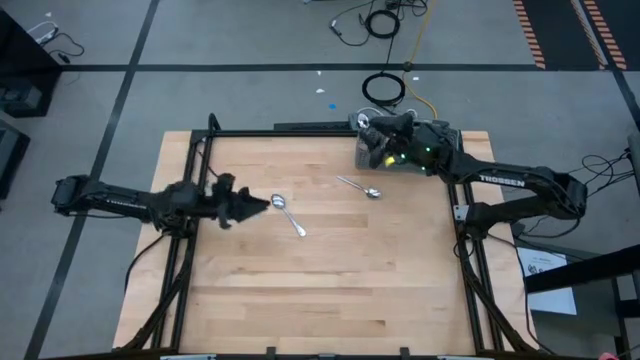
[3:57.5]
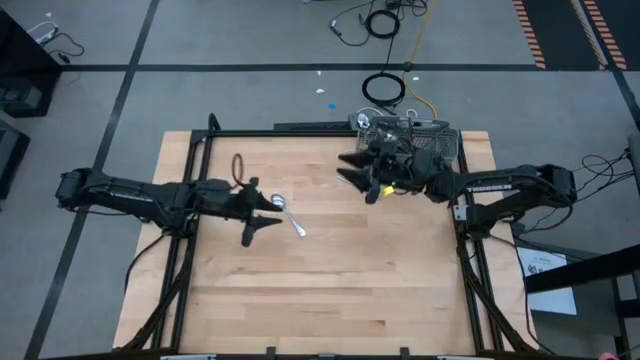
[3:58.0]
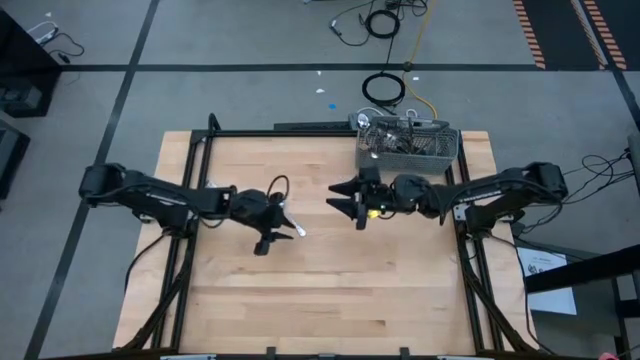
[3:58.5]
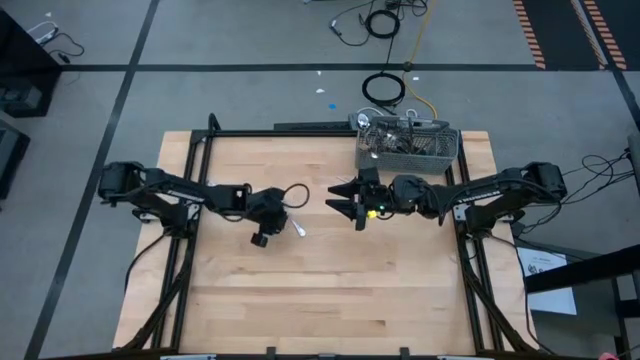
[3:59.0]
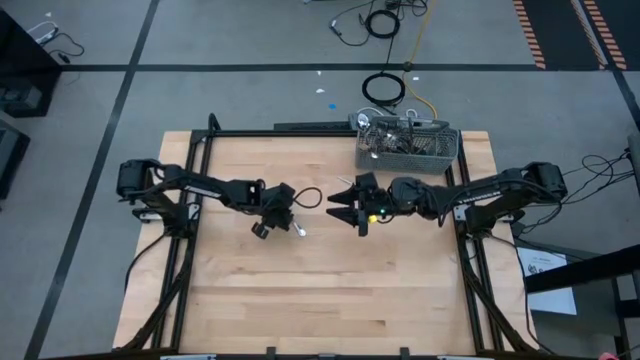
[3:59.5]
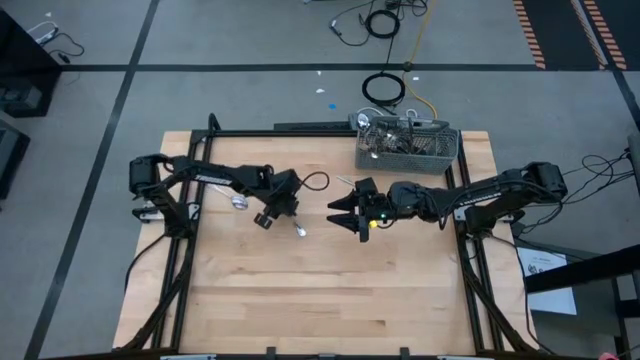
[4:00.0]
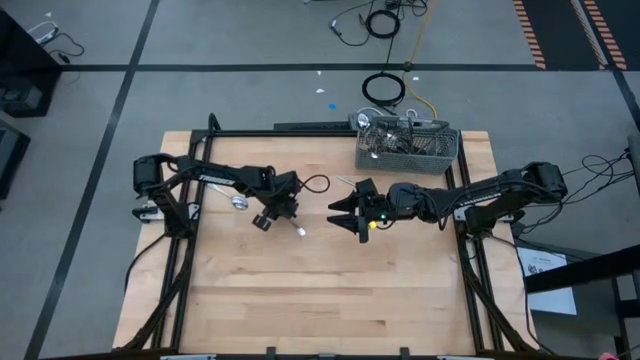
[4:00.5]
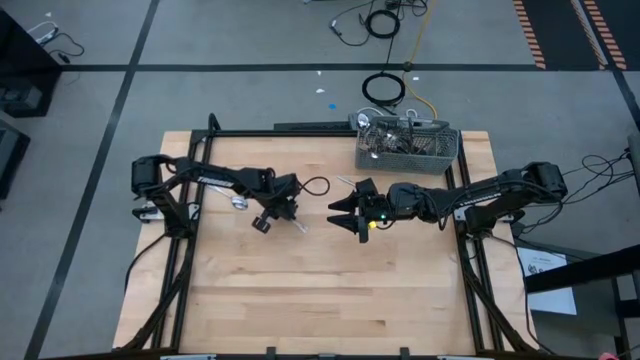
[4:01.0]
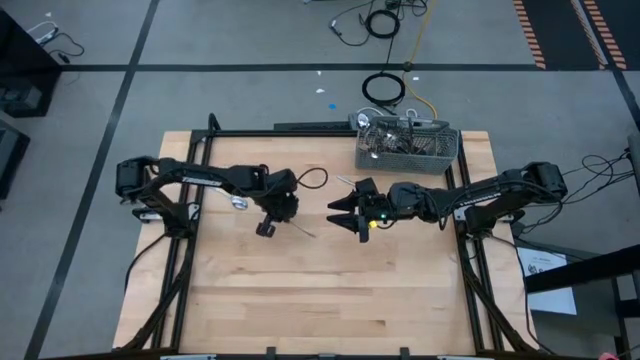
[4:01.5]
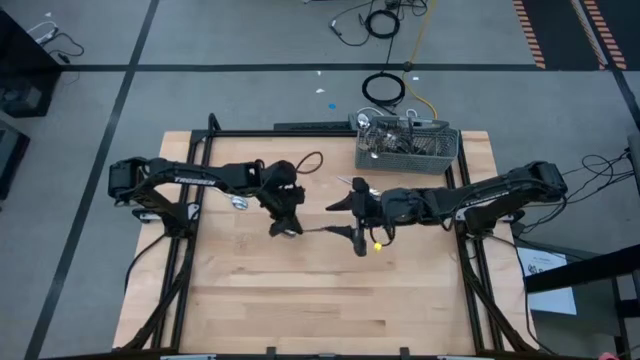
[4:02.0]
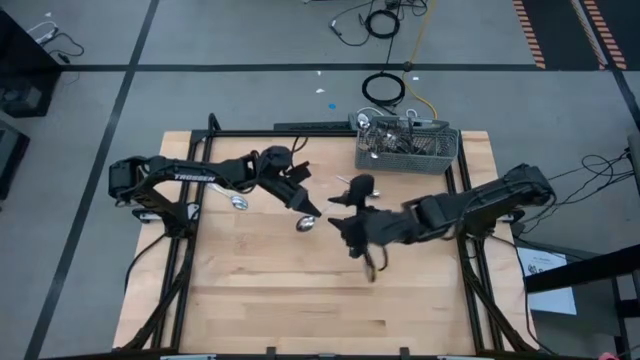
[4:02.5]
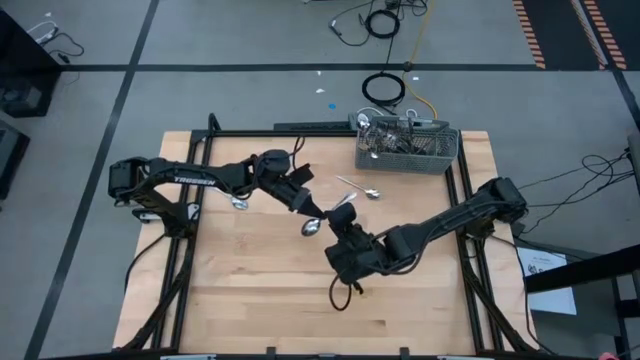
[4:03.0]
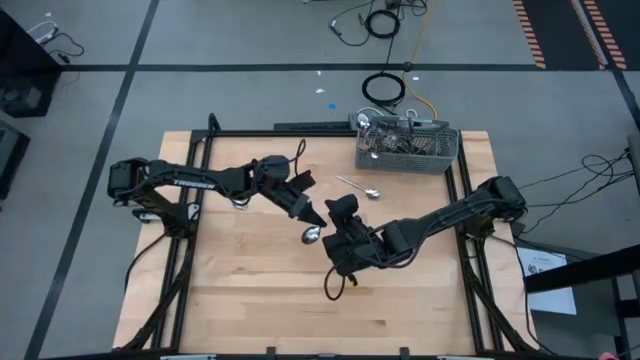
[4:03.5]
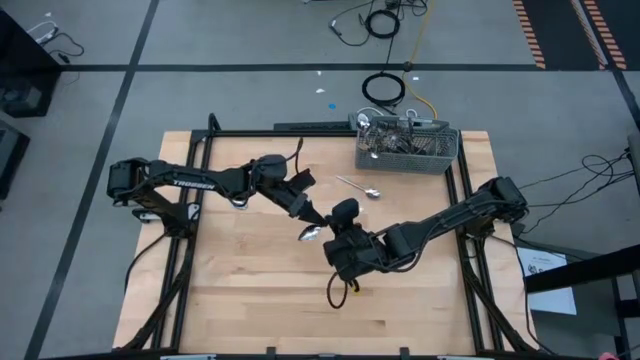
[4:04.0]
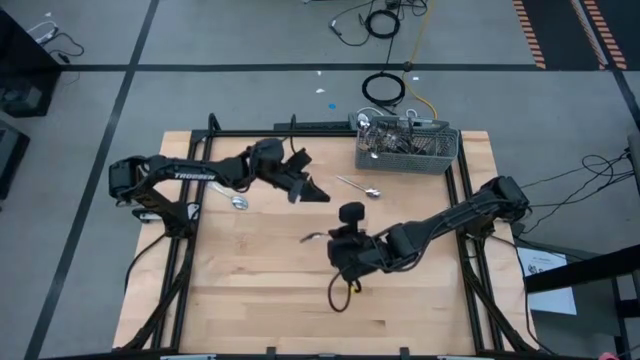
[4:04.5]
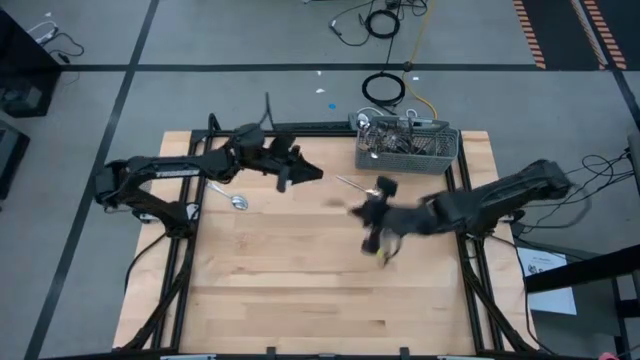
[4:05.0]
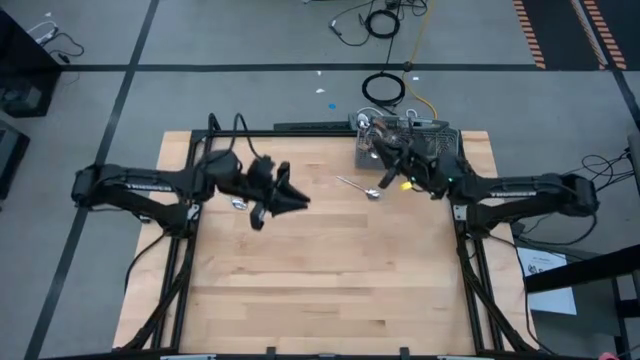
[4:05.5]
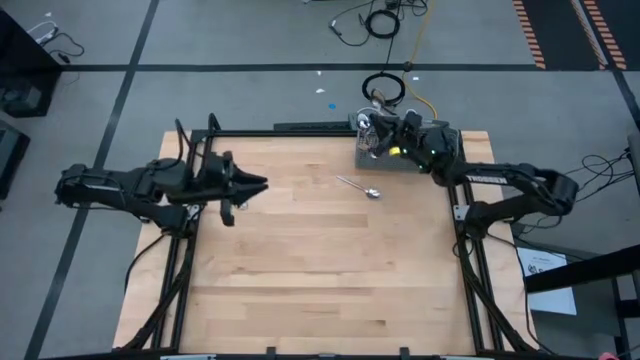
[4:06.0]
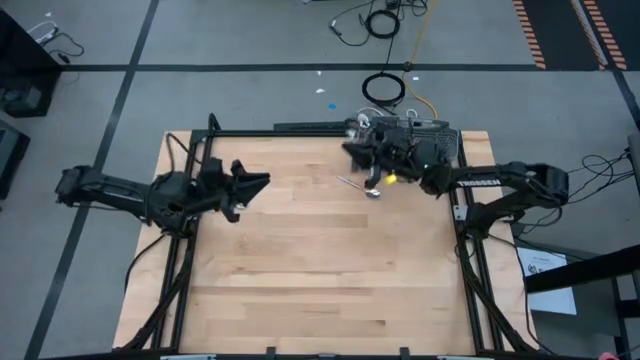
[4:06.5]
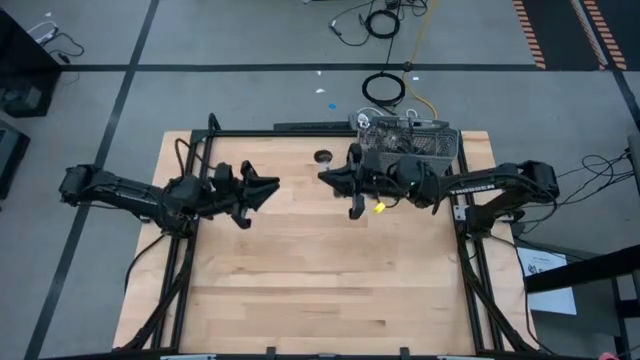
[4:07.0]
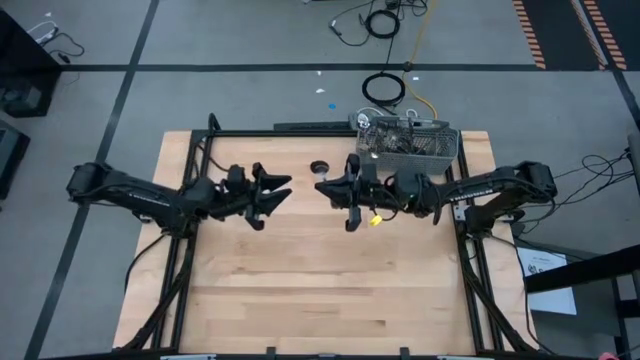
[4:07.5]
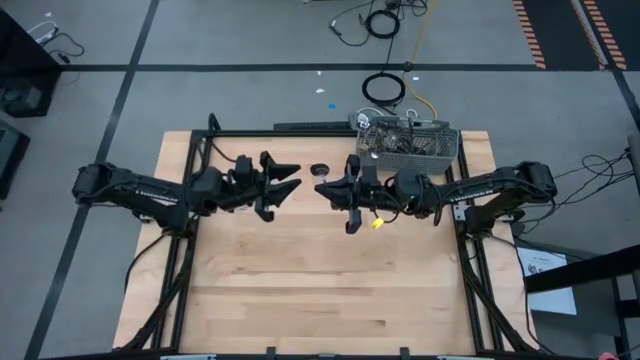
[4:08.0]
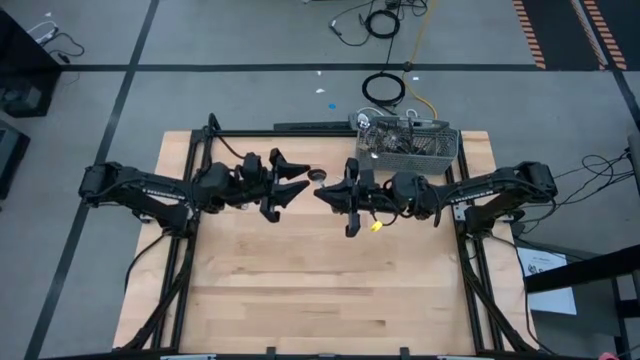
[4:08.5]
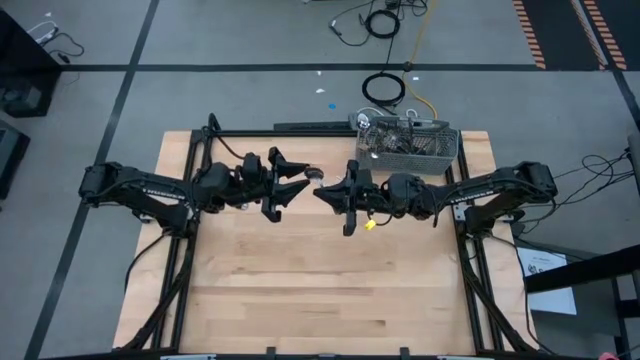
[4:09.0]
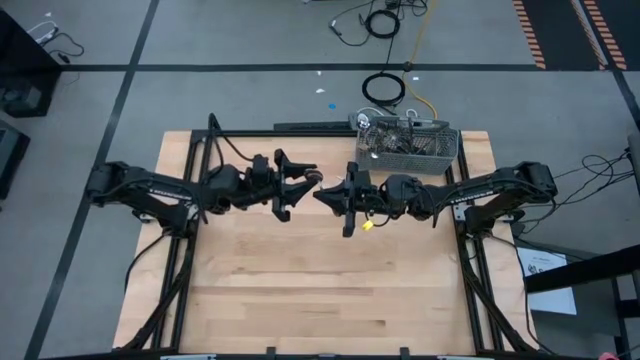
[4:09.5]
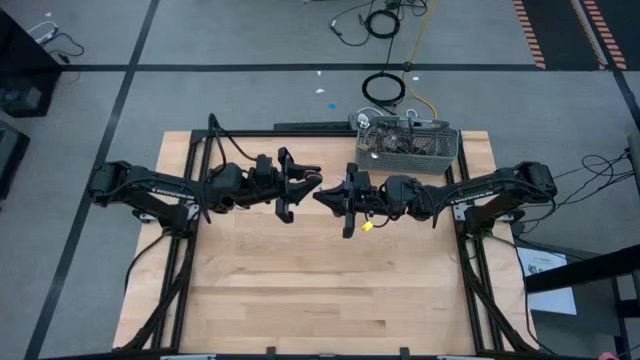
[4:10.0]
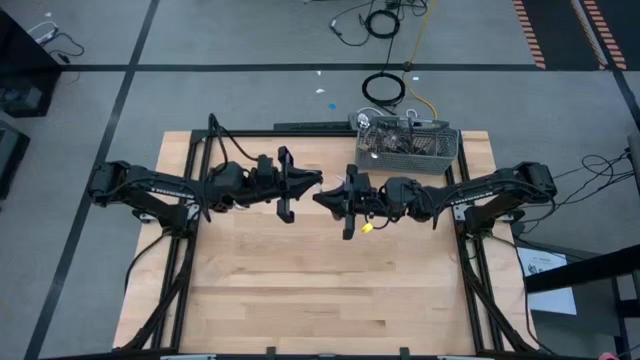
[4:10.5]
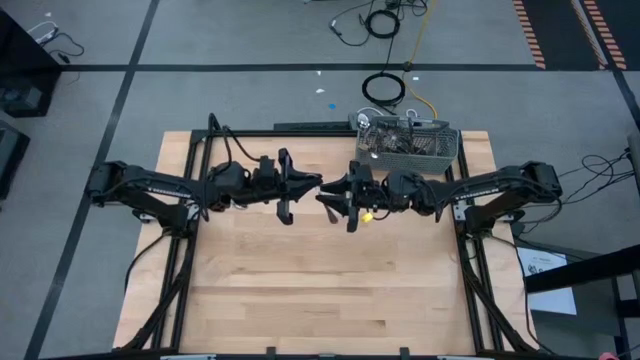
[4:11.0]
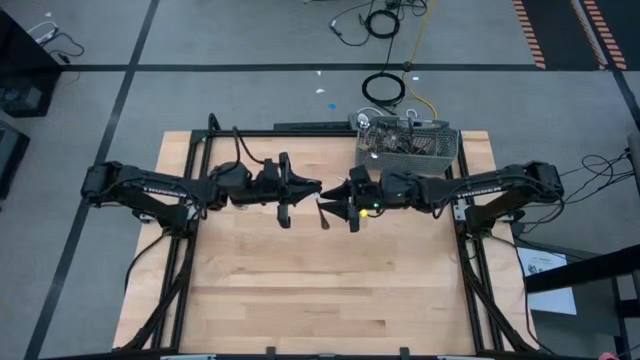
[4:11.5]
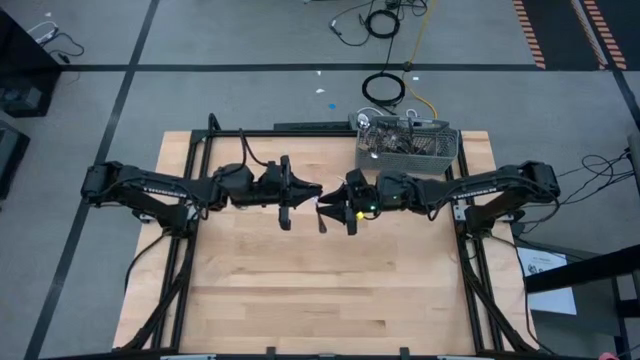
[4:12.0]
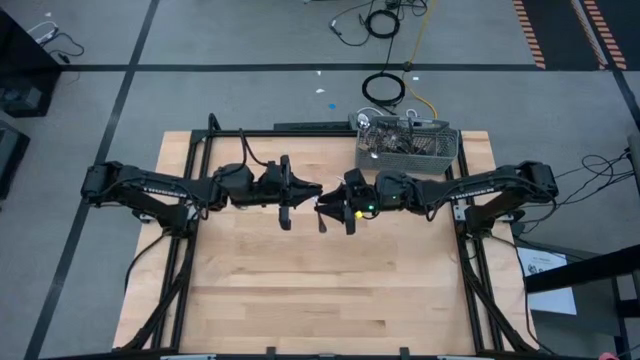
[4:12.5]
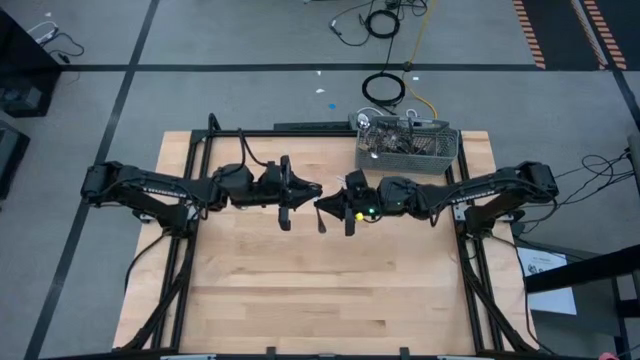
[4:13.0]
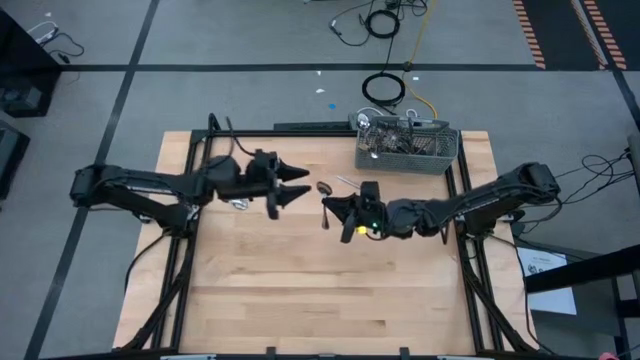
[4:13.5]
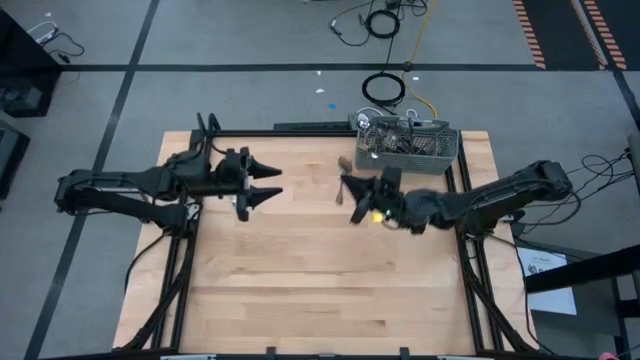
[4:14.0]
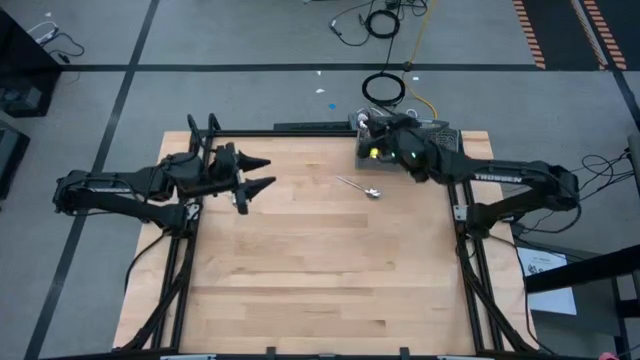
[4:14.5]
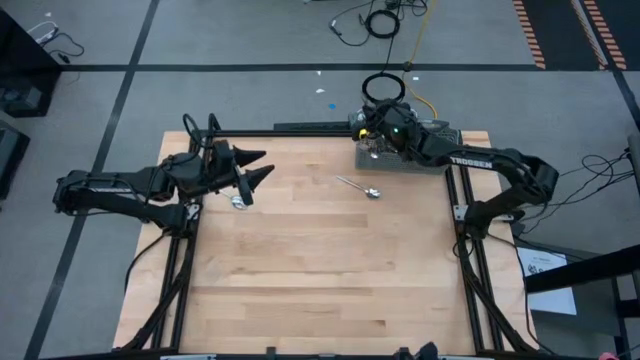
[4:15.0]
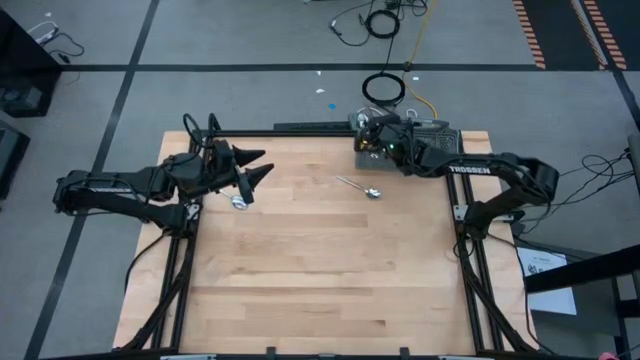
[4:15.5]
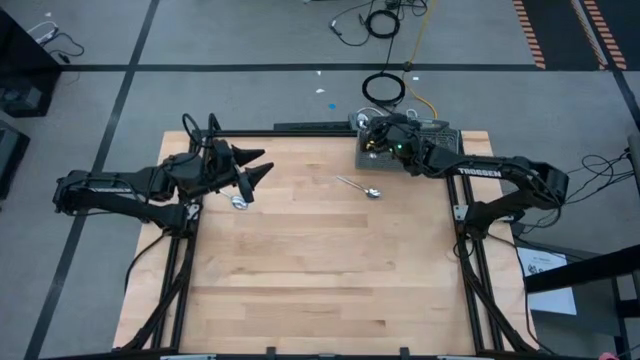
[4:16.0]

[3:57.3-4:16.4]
Task: Sort silverware
Put the silver spoon into the gray utensil holder
